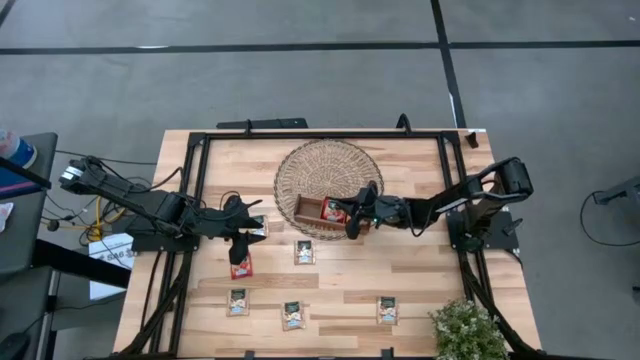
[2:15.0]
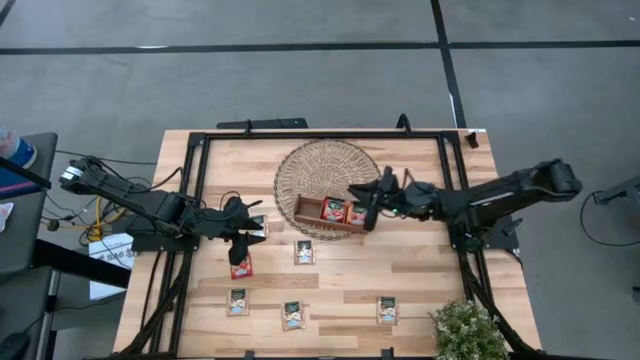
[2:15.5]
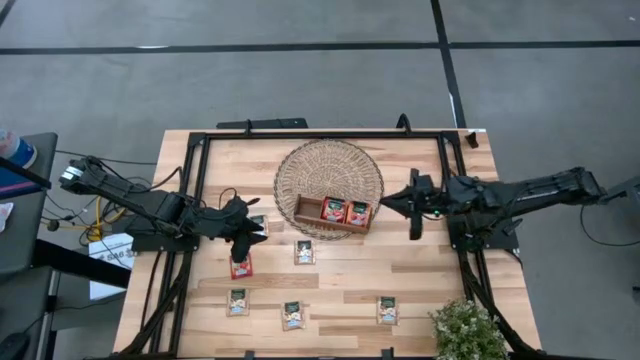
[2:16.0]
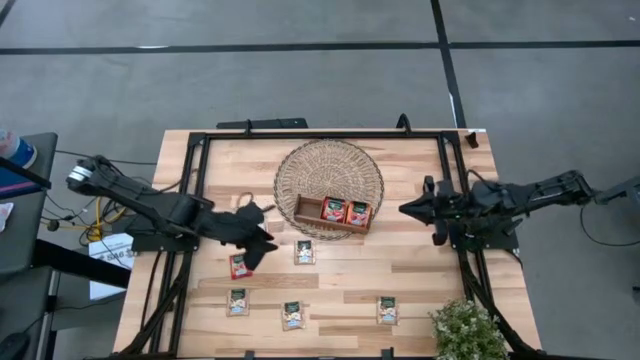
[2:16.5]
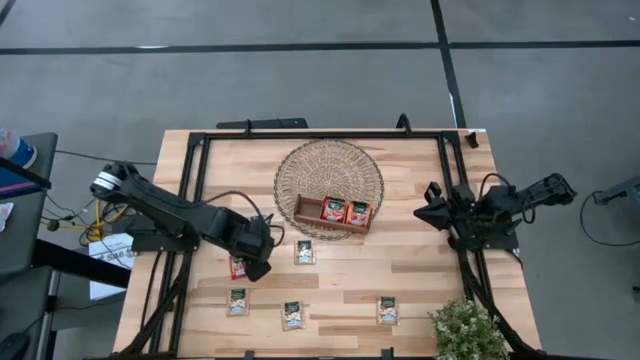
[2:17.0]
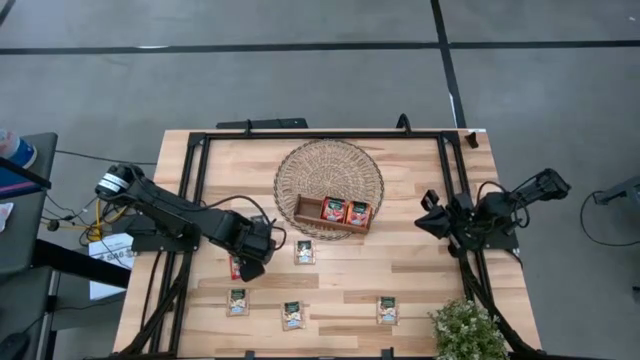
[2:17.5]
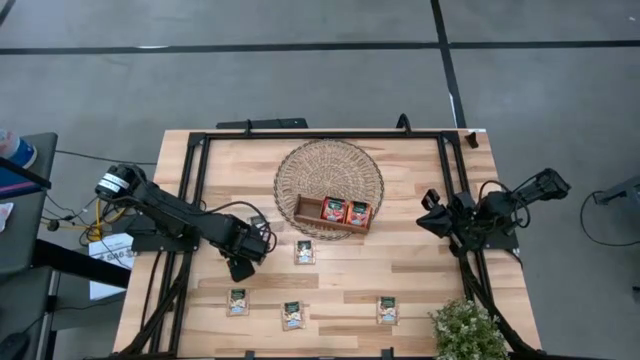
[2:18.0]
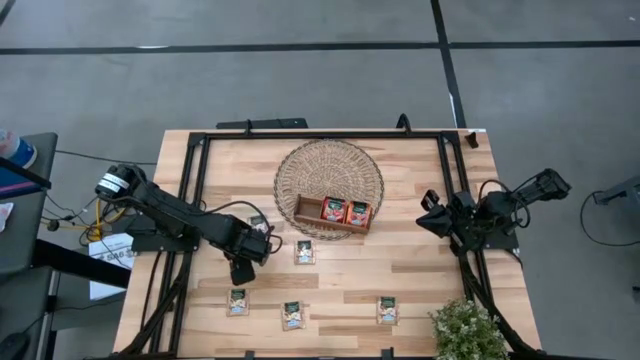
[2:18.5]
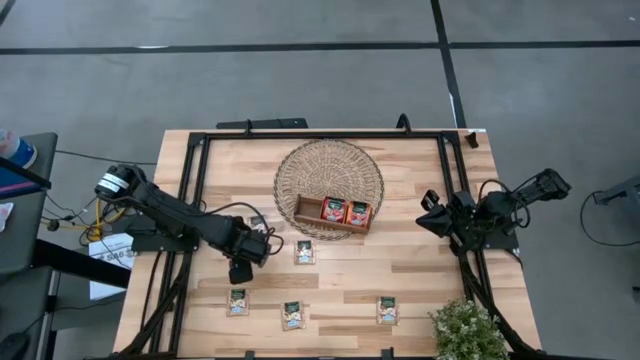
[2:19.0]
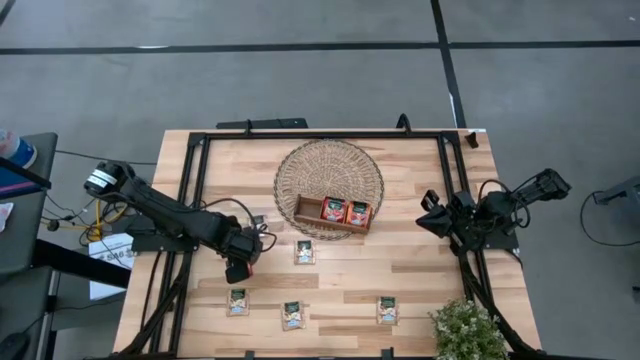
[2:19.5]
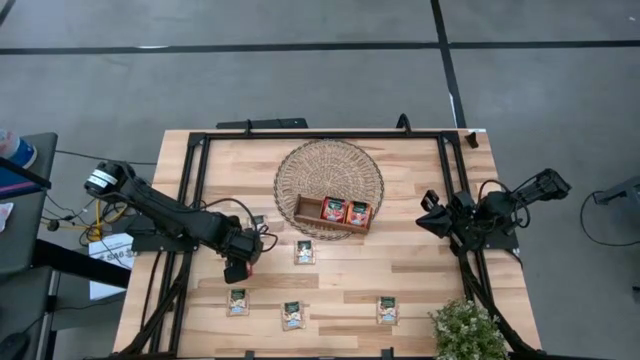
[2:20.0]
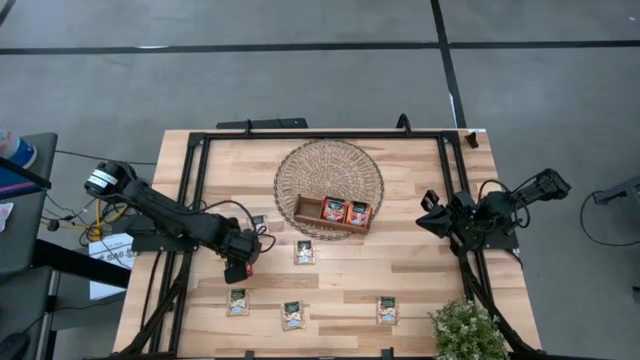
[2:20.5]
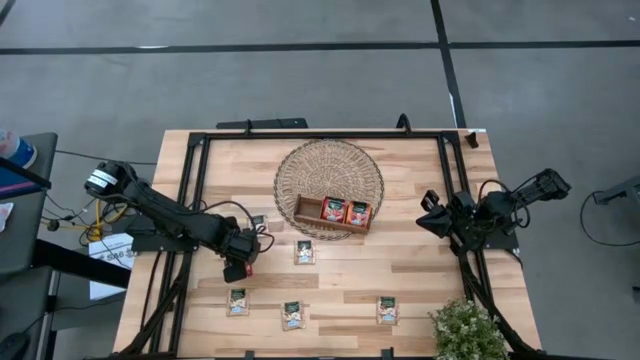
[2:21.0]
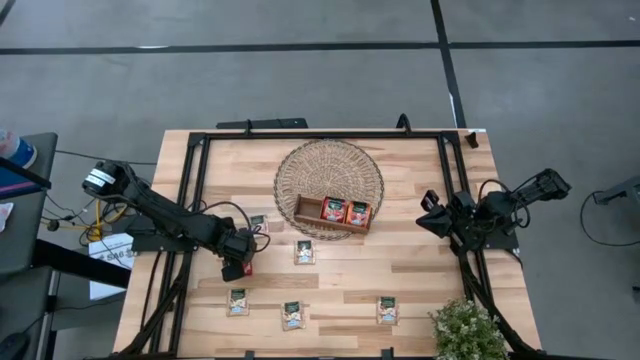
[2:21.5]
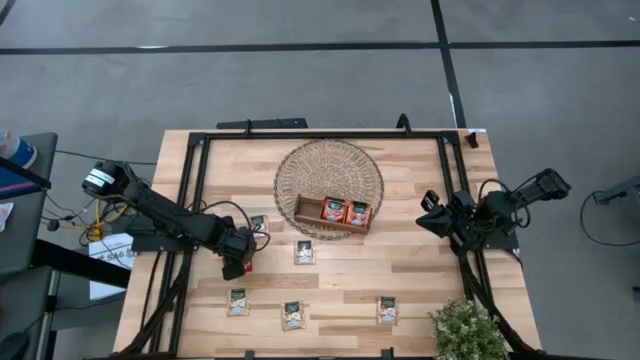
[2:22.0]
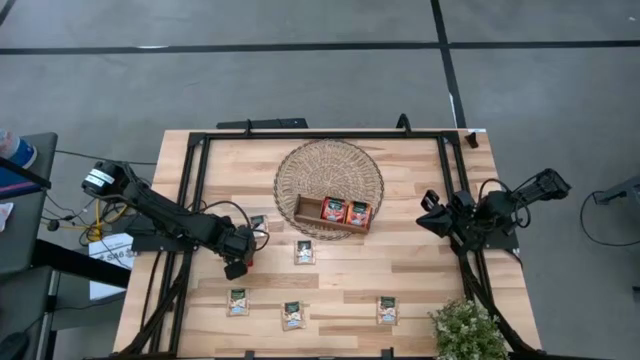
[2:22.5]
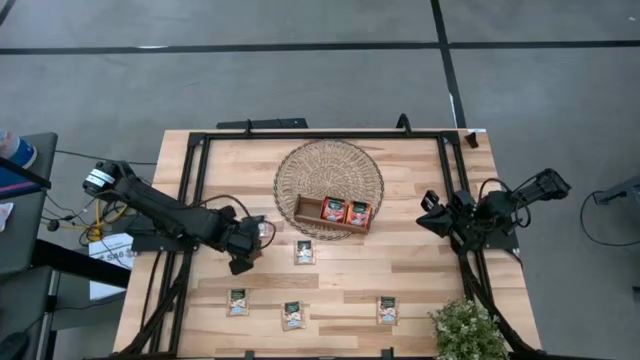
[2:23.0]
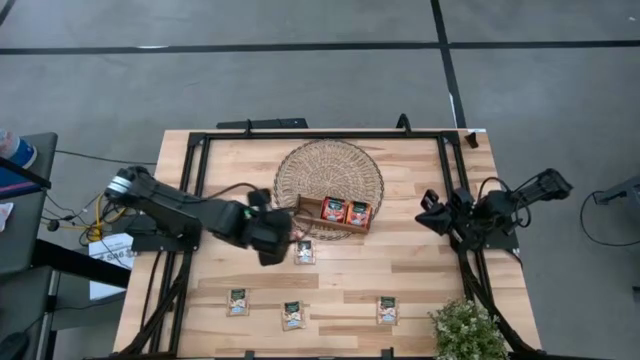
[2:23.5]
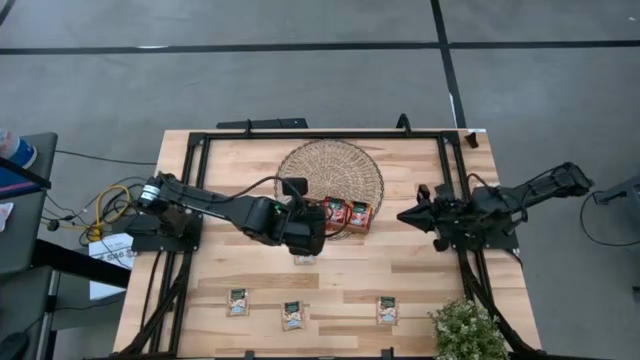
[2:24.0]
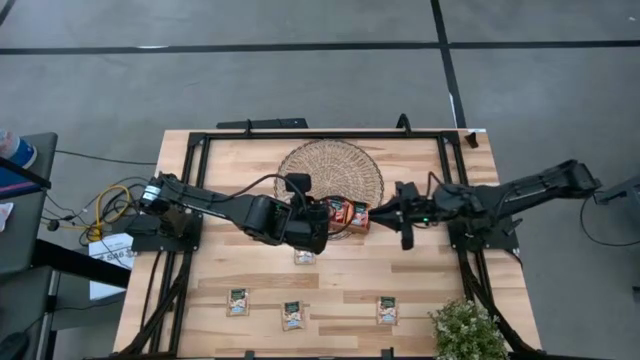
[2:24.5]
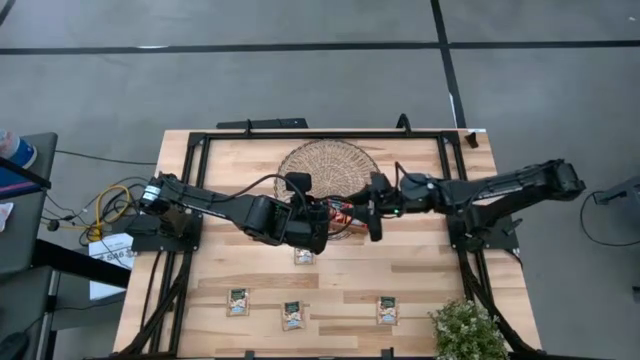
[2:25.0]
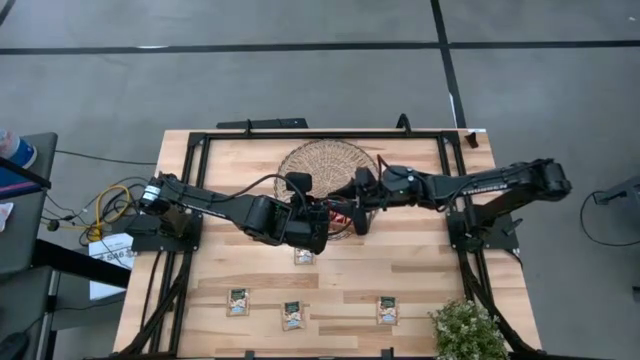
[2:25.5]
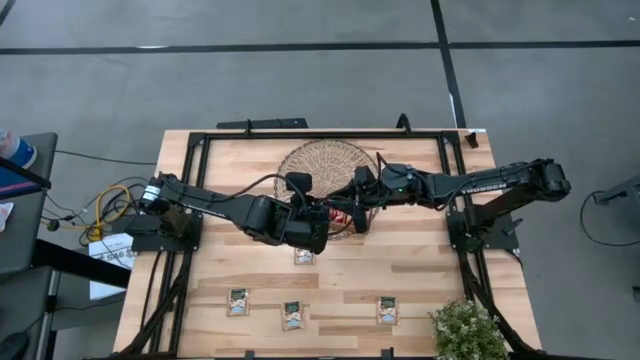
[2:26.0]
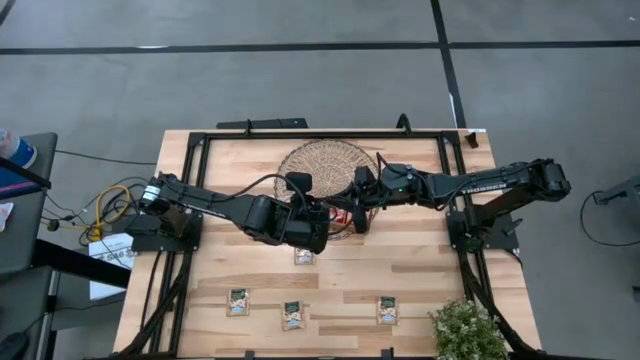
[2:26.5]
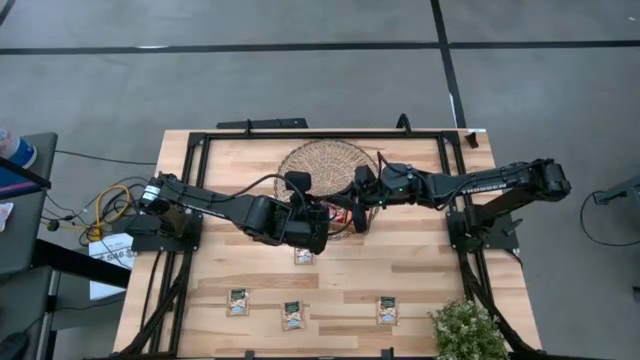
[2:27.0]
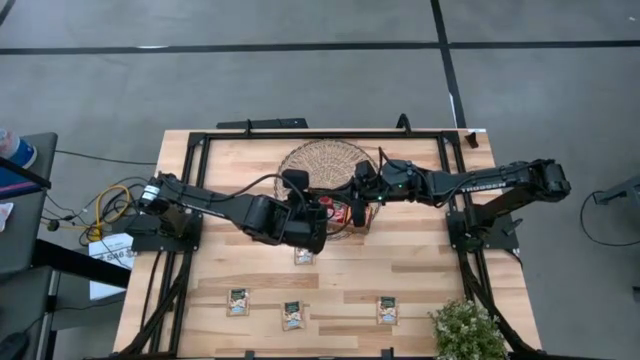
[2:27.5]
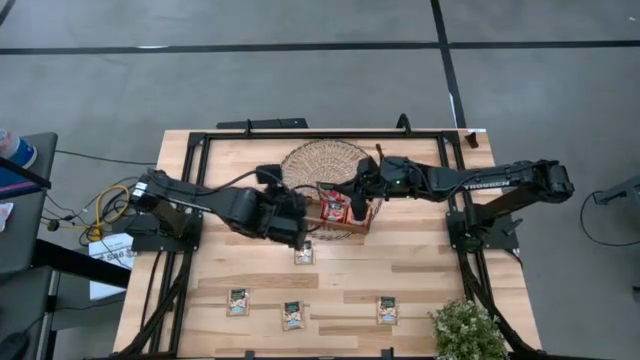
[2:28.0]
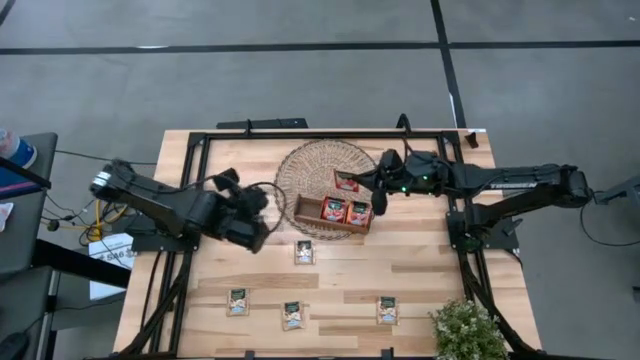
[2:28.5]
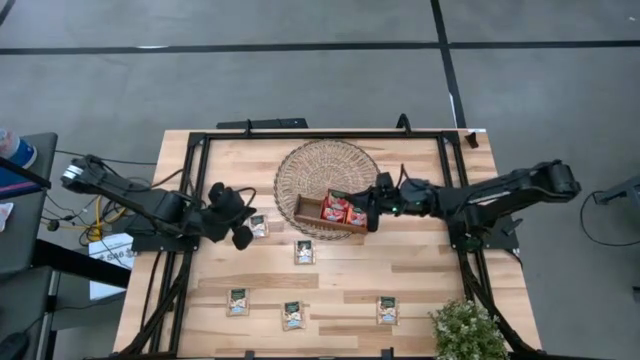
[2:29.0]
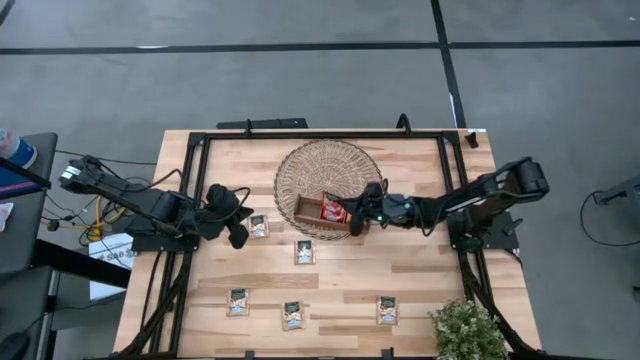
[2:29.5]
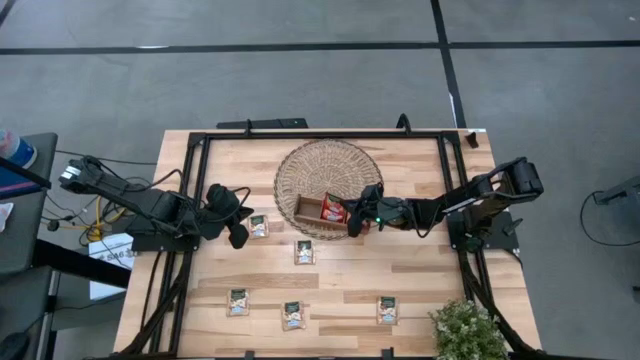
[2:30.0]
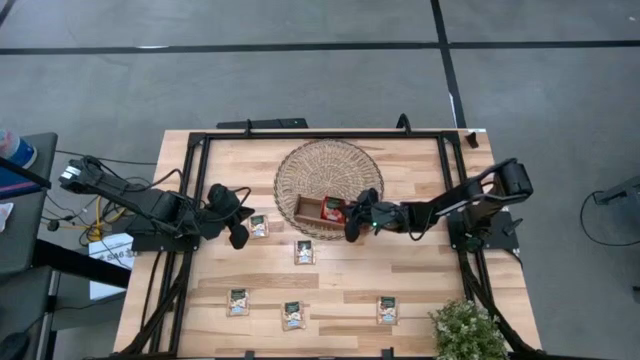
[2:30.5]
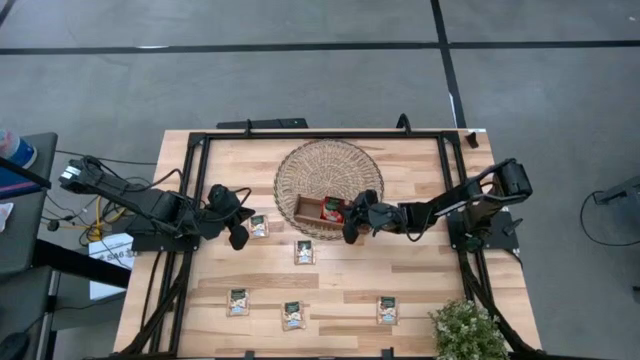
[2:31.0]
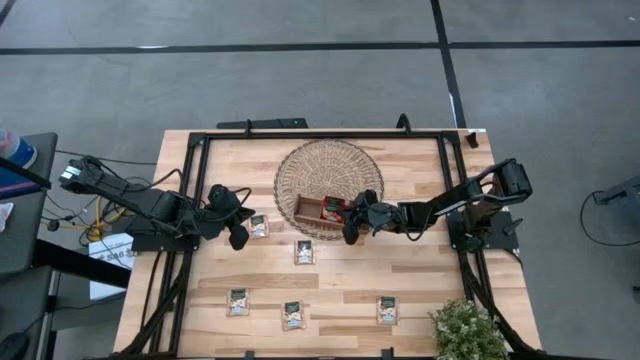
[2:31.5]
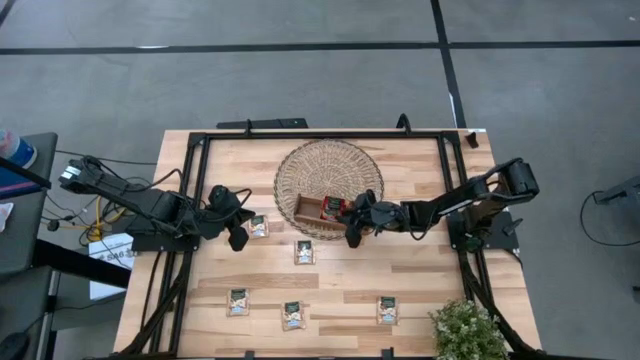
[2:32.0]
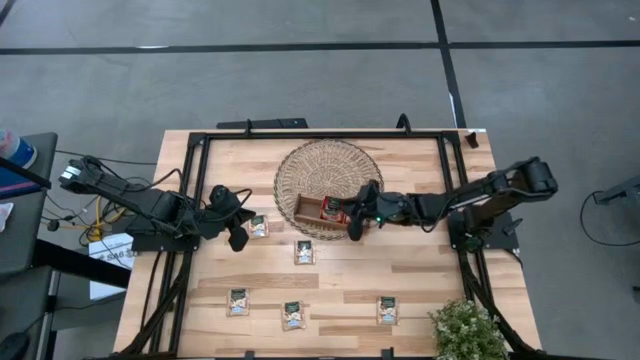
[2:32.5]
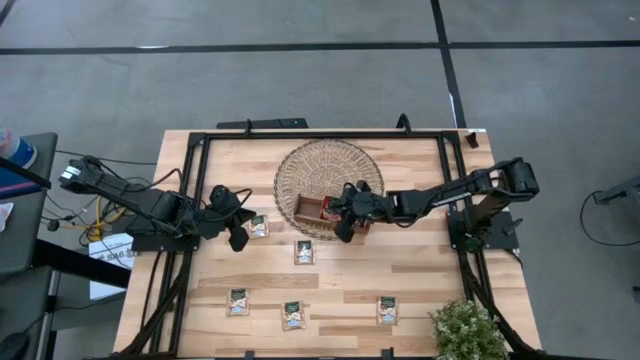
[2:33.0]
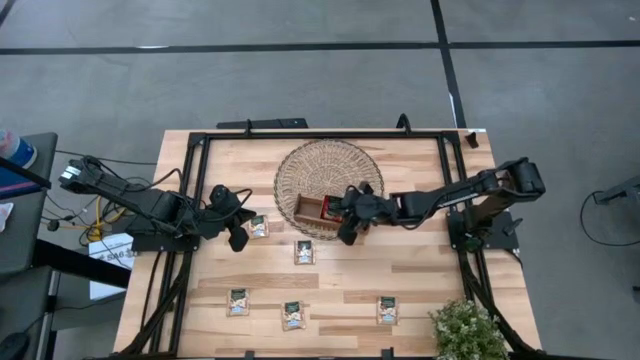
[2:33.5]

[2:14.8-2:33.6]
Task: Pick & Place Tea
Put the red tea bag into the middle section of the wooden organizer
